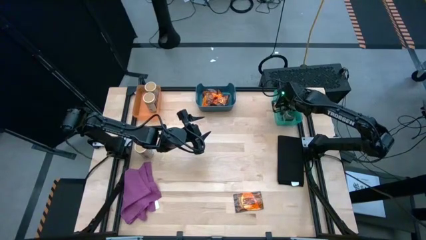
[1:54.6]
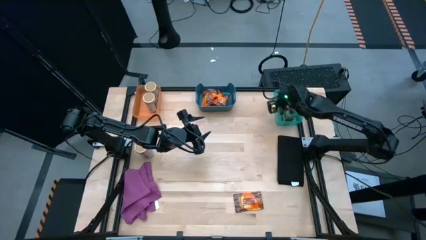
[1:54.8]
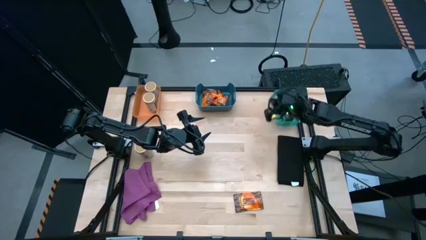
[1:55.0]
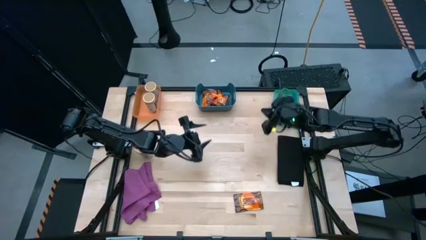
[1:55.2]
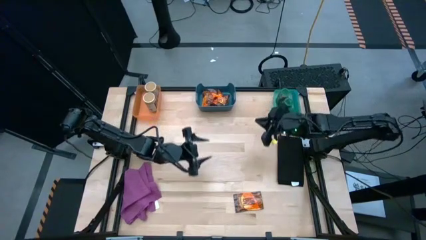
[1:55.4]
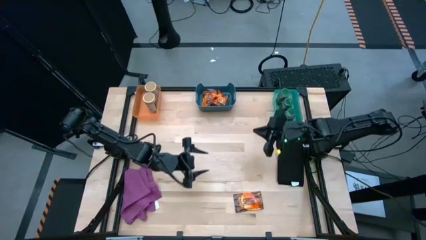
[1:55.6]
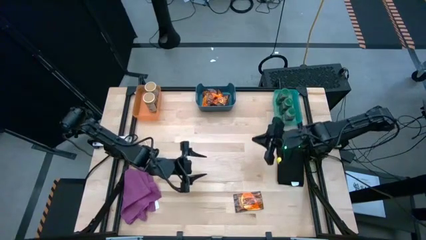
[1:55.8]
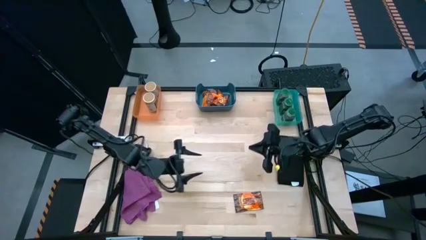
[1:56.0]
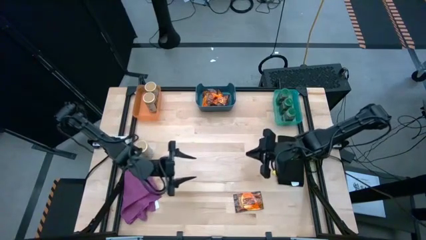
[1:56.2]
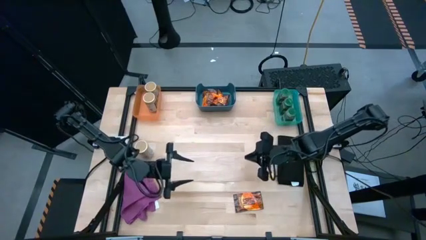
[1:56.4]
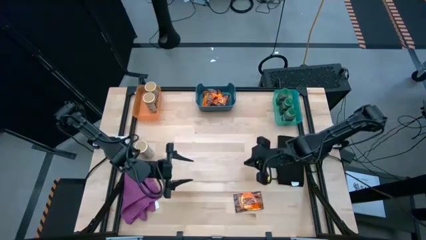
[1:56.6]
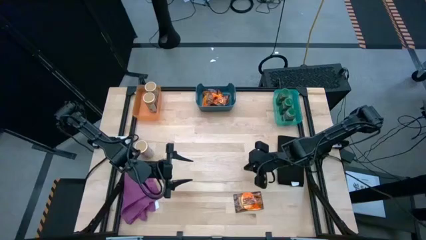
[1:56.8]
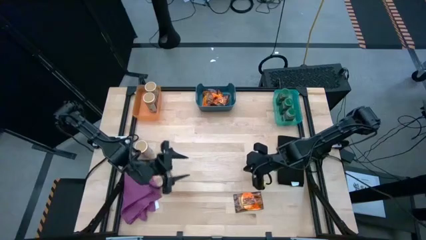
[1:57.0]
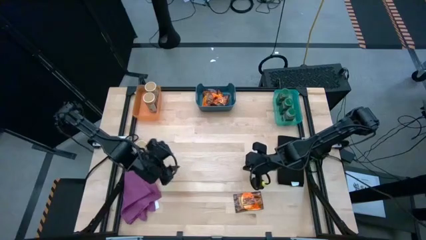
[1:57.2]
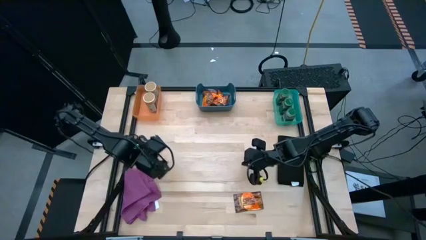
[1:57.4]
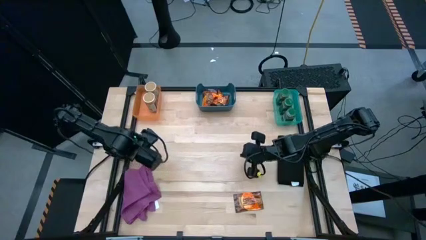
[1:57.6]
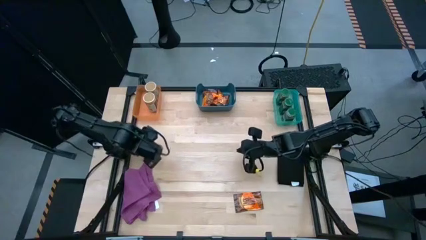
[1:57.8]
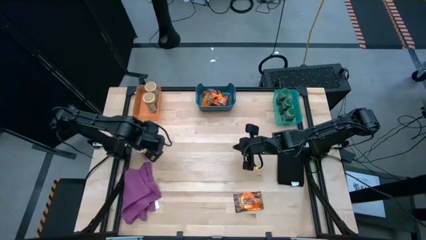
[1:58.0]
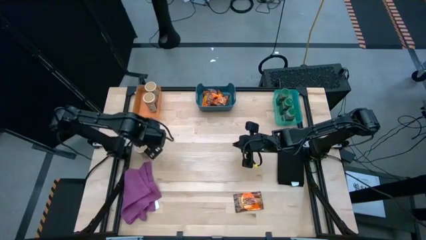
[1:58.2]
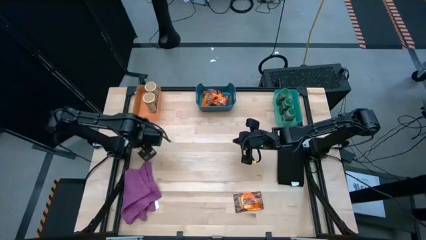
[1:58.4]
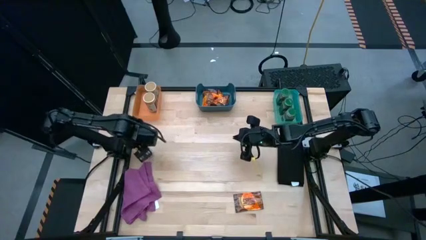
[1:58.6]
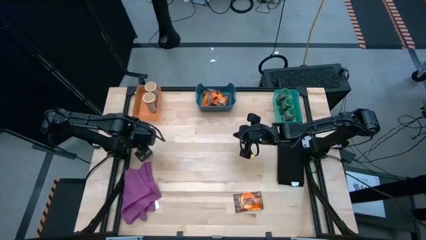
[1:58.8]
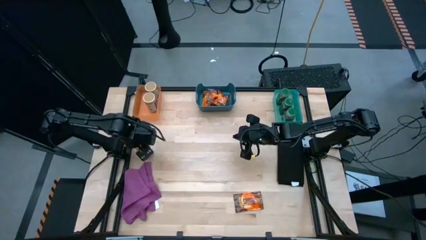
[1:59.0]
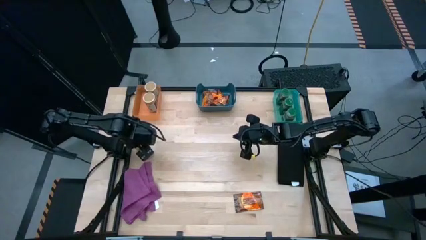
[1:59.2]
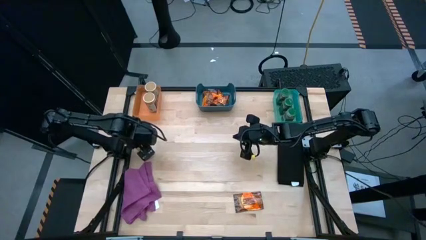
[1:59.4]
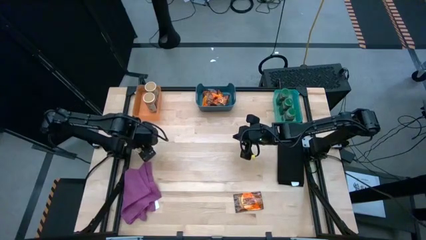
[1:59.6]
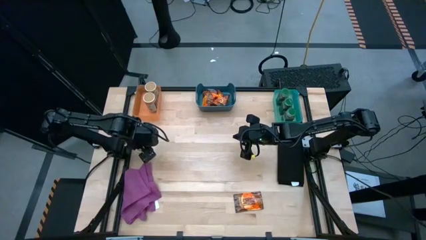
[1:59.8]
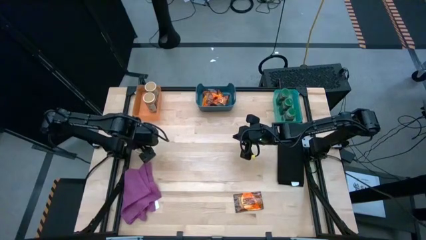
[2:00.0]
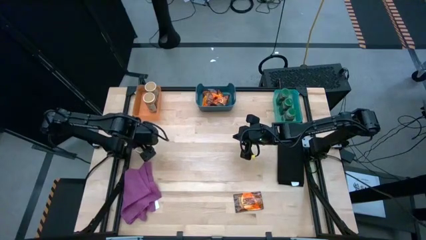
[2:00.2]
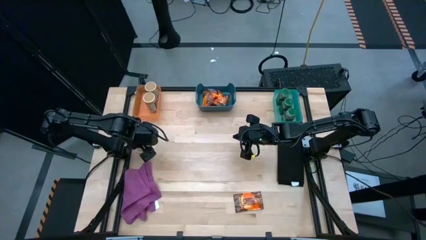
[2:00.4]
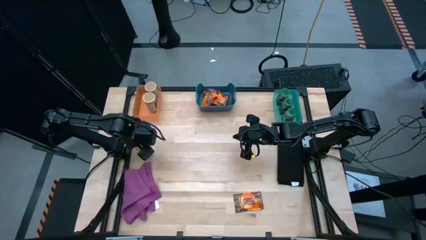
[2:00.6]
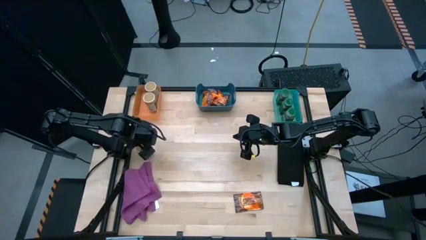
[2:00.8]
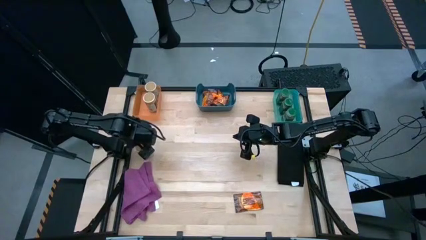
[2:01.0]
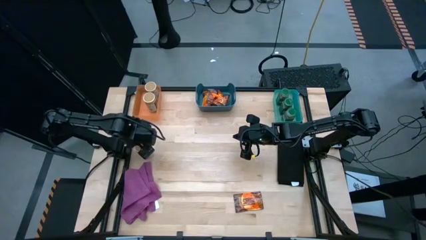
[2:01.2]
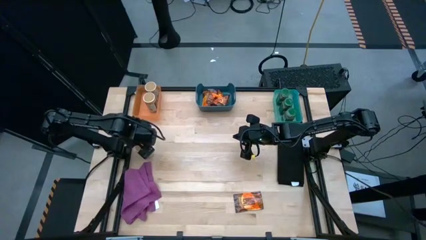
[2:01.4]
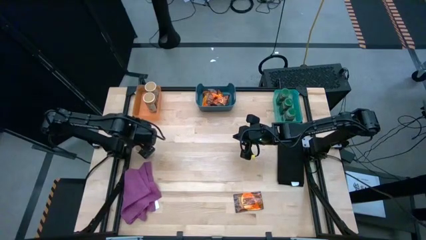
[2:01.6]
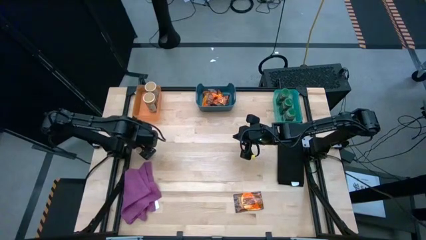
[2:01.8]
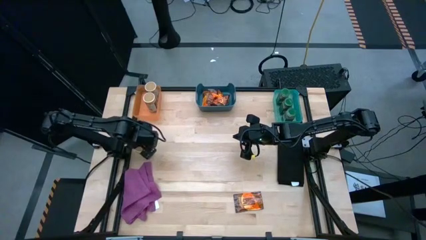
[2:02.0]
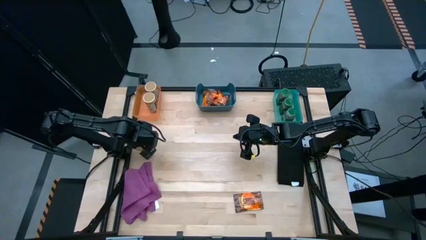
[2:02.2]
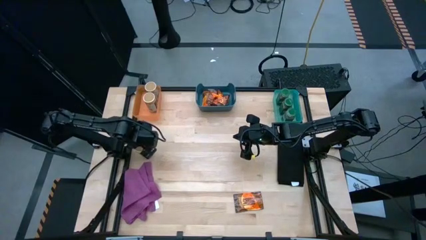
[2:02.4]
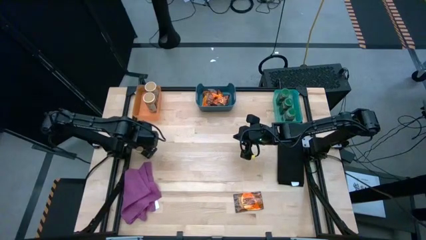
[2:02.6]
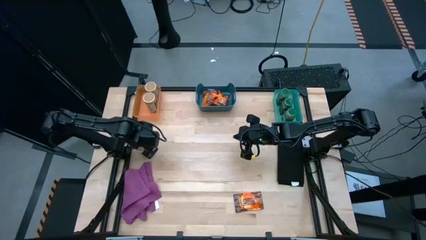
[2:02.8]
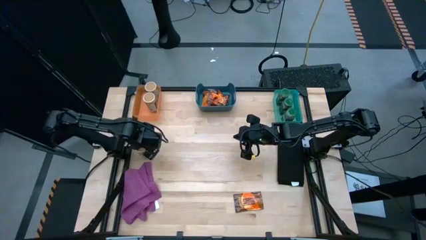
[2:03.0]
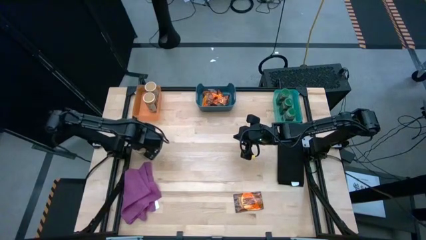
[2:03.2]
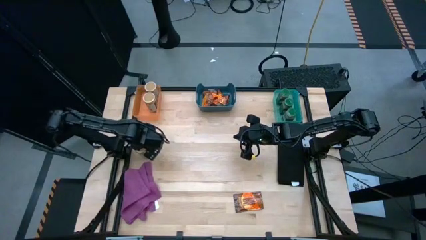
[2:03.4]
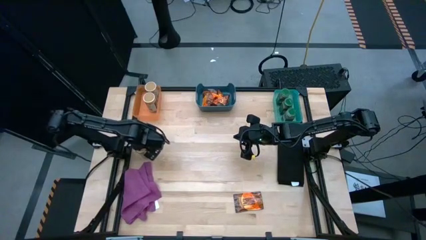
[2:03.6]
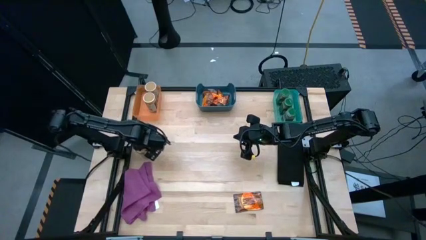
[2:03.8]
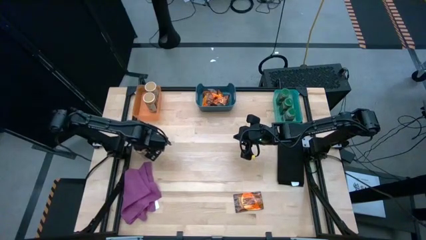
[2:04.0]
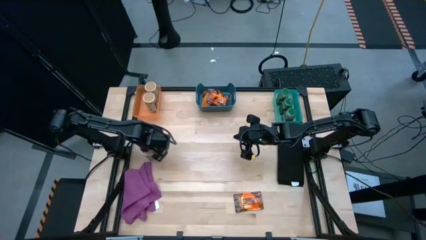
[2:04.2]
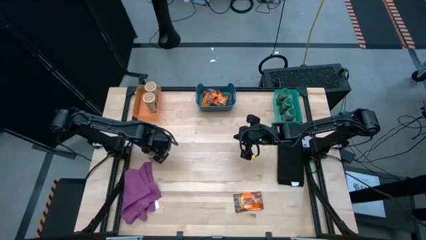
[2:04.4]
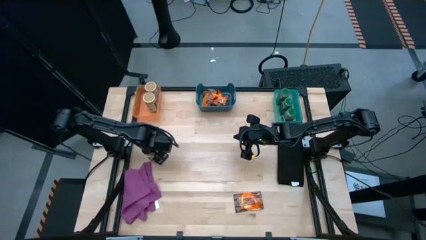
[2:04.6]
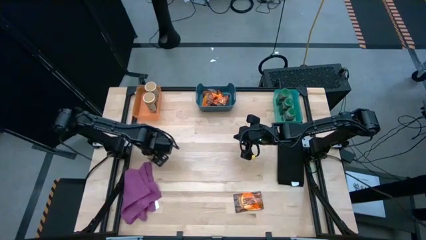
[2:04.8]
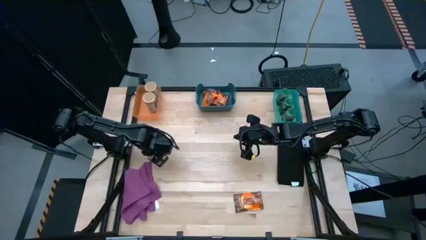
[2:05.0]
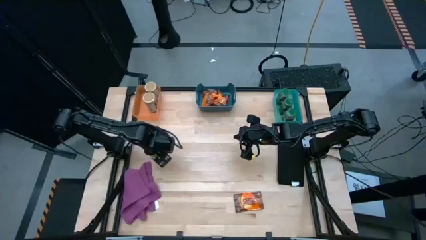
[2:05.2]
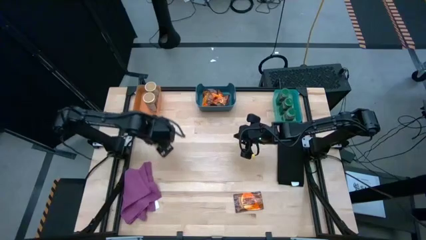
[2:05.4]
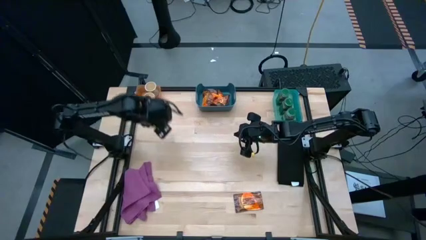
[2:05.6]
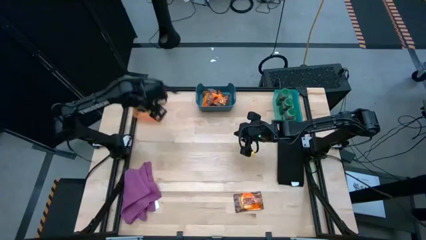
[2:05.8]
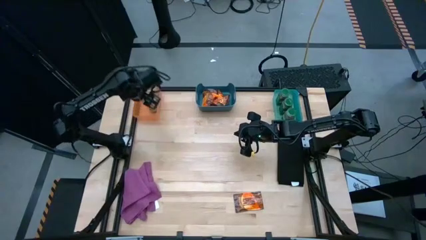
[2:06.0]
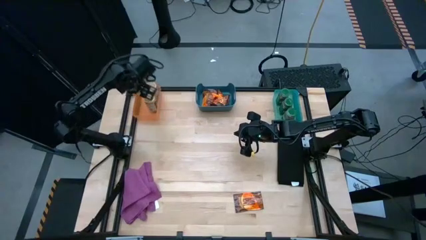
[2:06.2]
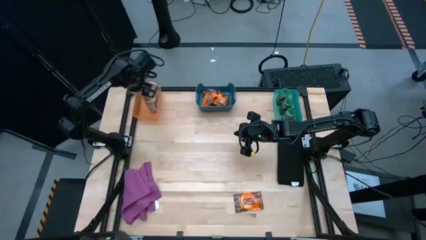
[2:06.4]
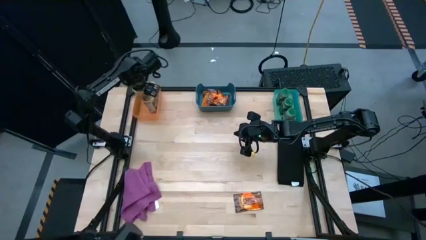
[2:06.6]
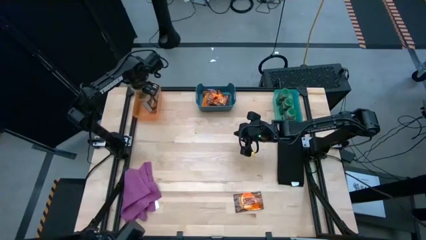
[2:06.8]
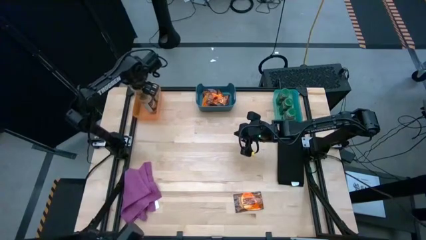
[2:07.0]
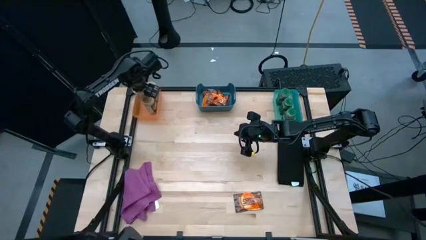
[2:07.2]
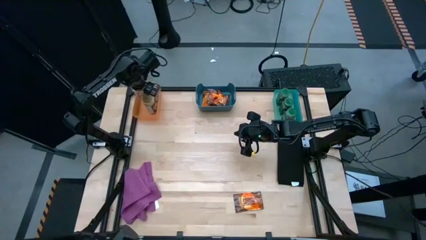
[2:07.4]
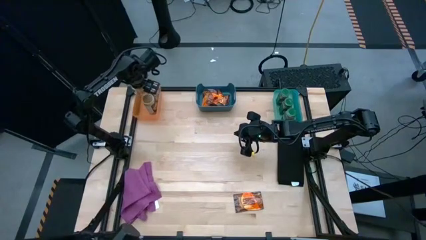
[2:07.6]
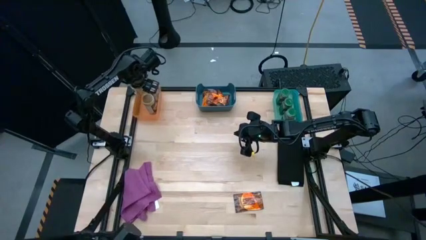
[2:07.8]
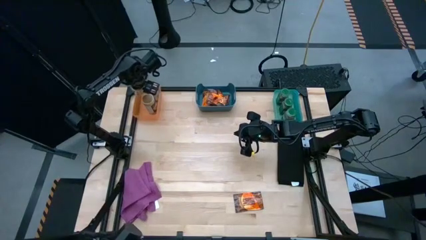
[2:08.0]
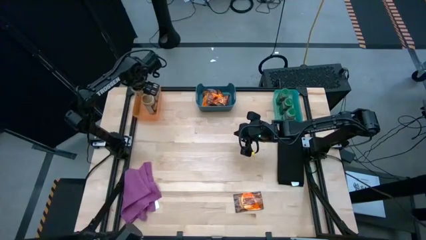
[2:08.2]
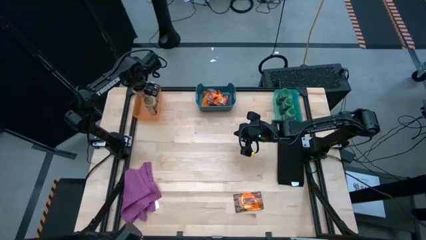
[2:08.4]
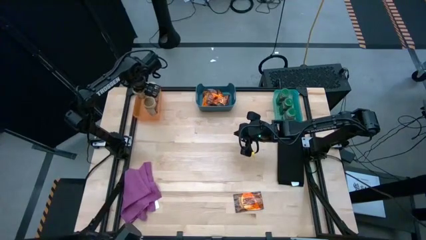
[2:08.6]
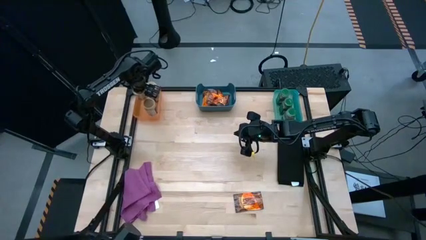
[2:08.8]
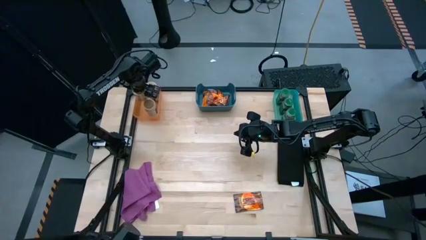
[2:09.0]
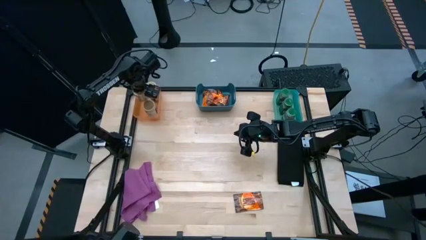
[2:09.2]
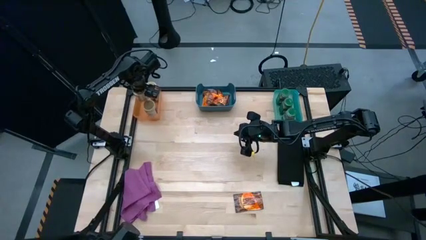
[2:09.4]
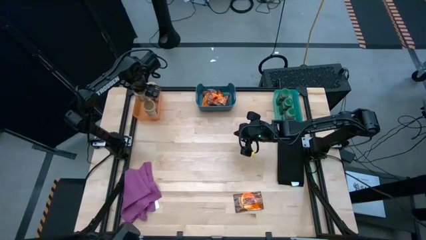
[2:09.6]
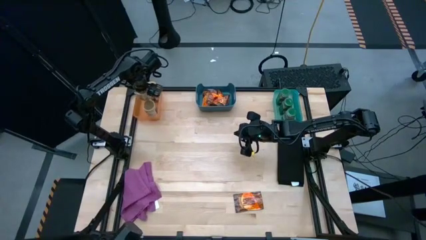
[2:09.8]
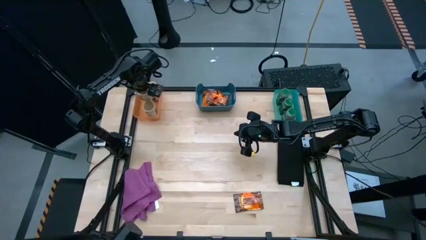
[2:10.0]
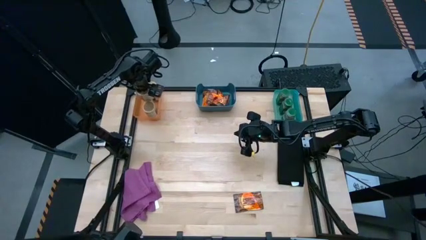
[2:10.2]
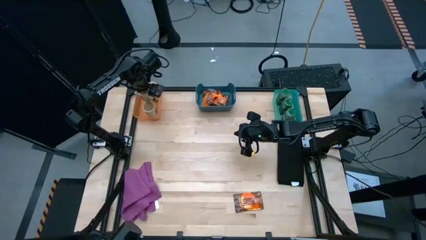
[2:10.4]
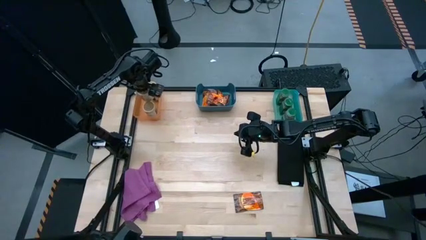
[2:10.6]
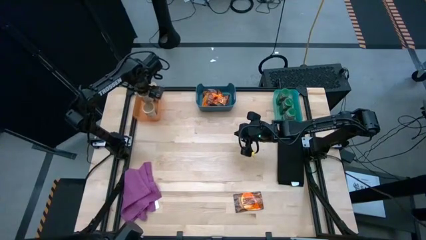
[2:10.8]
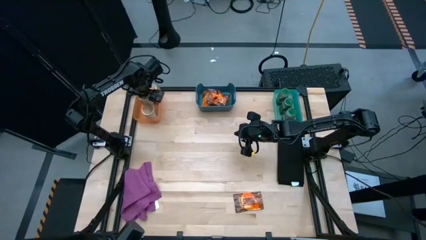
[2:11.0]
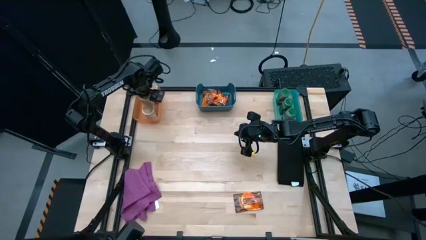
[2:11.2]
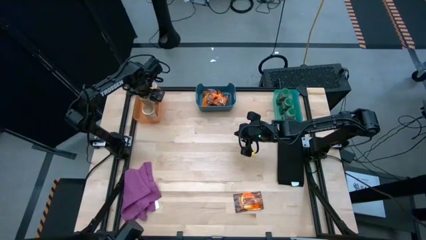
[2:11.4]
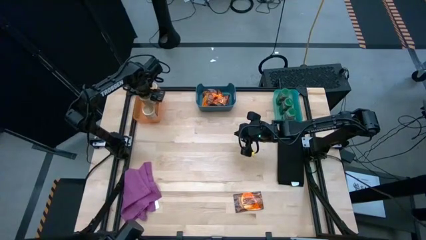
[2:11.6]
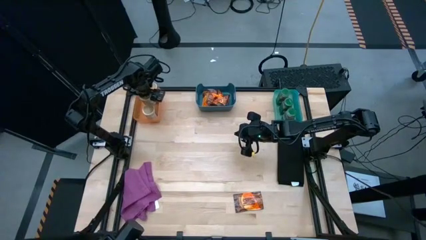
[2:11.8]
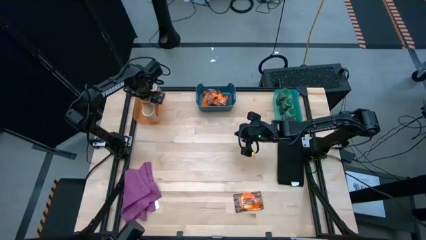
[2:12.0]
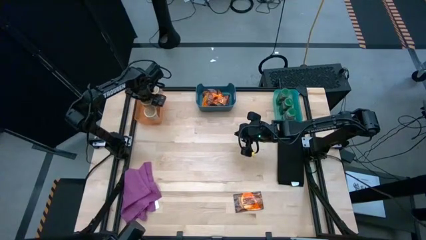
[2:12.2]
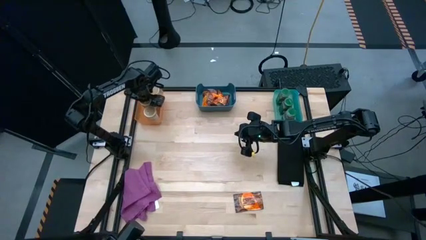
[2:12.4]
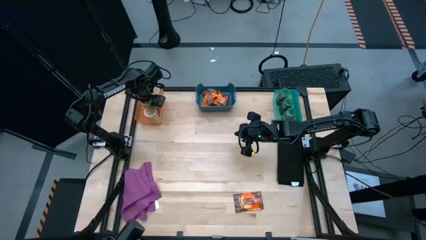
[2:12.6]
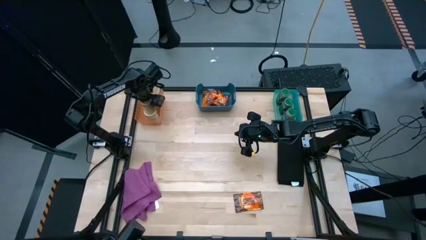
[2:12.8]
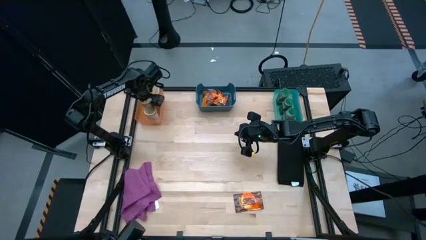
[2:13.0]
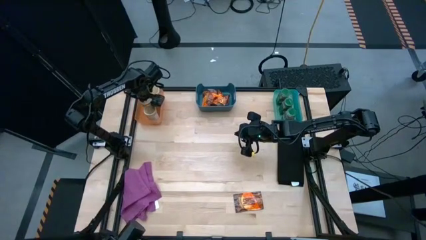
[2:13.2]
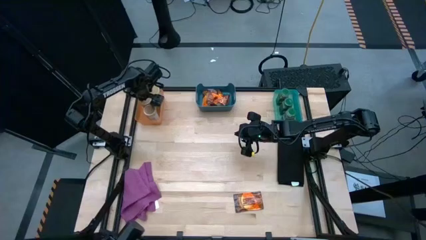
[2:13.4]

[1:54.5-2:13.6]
Task: Sort spices by type
Put the gold seasoning bottle into the orange bin
